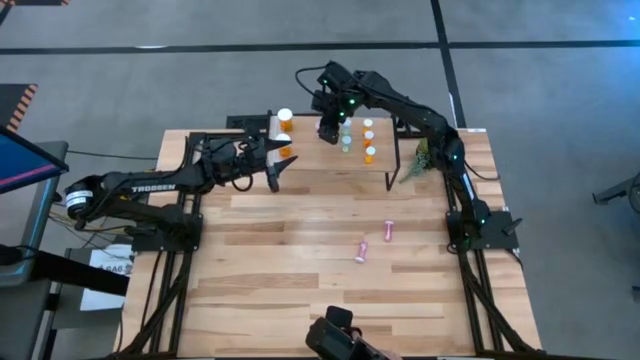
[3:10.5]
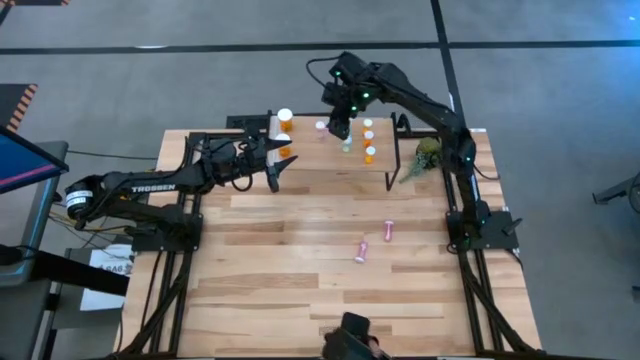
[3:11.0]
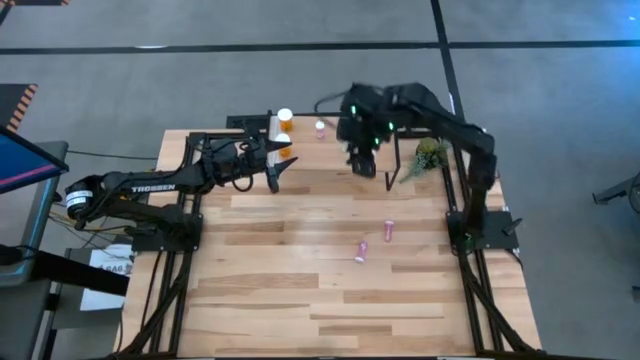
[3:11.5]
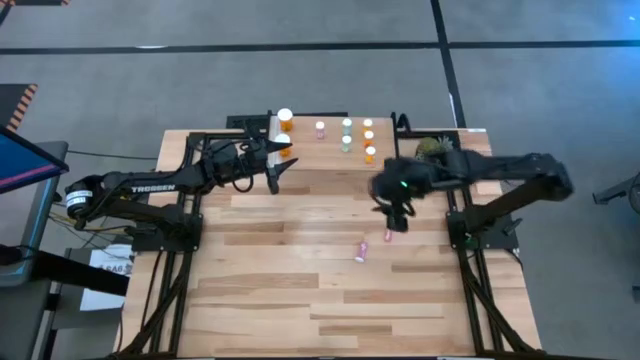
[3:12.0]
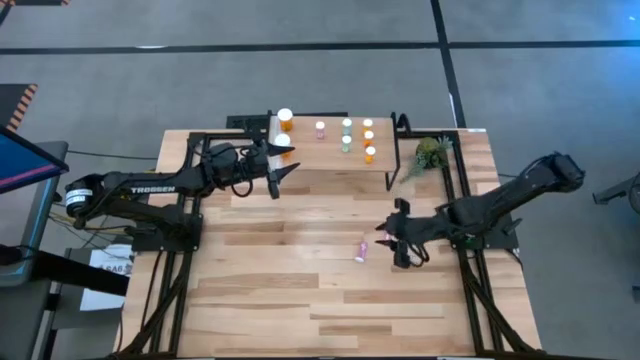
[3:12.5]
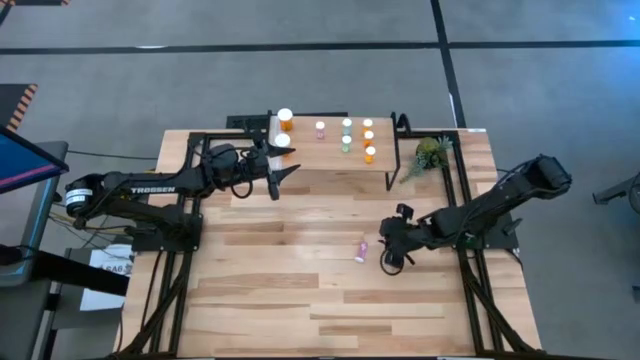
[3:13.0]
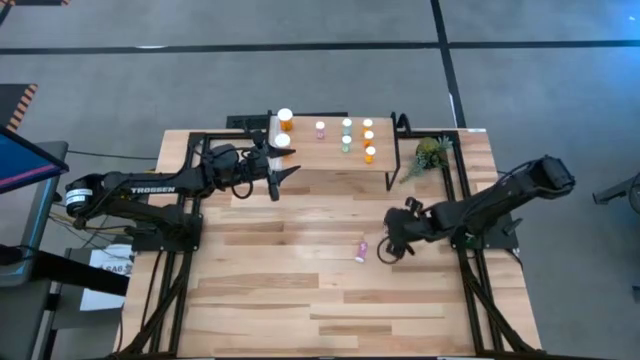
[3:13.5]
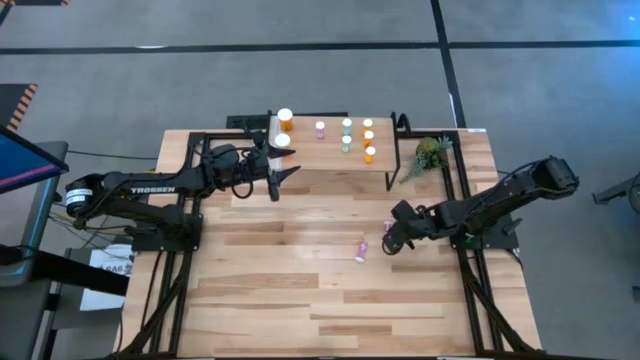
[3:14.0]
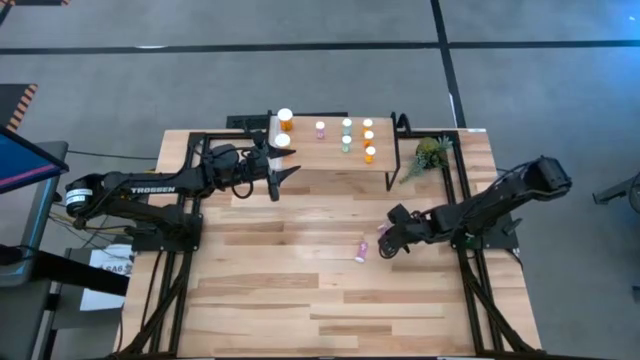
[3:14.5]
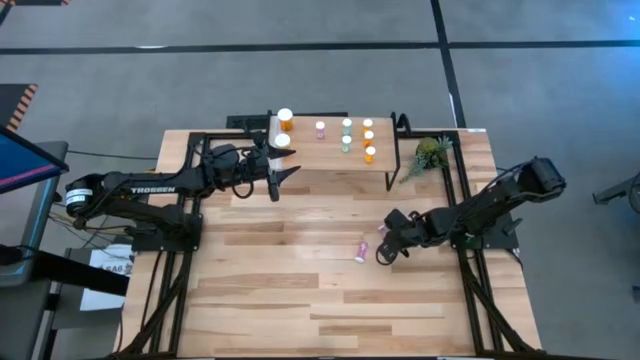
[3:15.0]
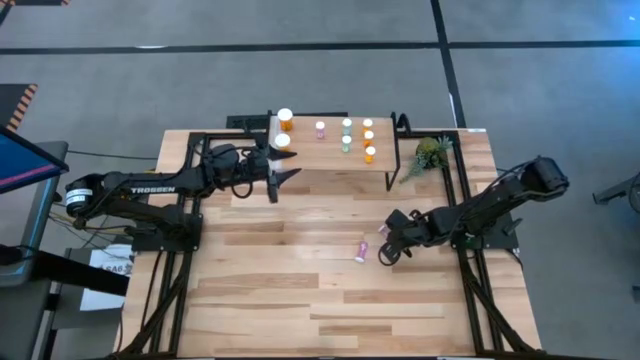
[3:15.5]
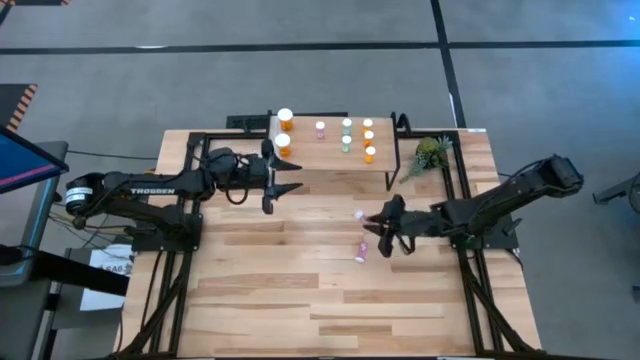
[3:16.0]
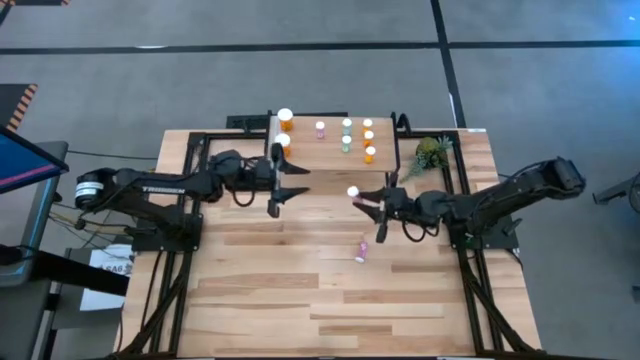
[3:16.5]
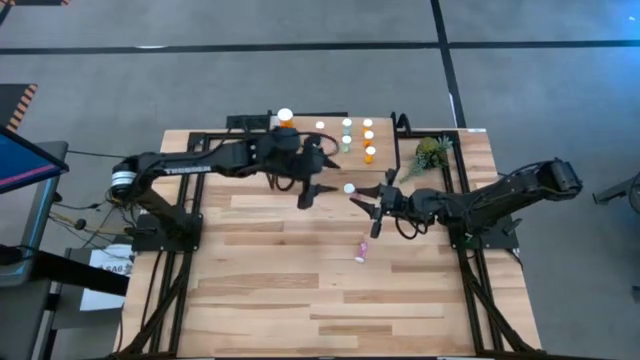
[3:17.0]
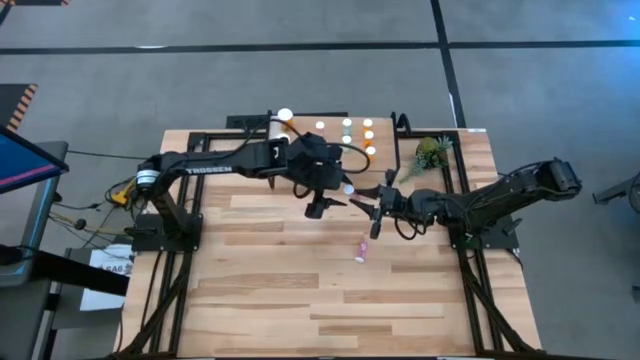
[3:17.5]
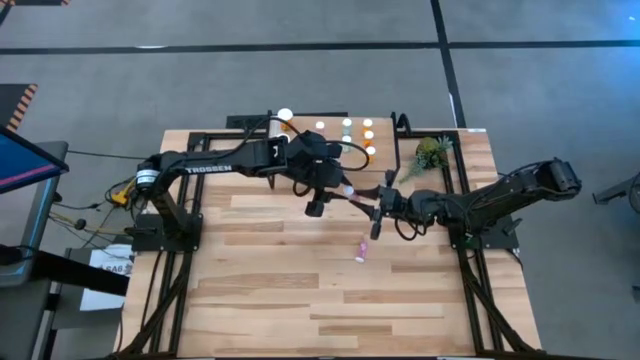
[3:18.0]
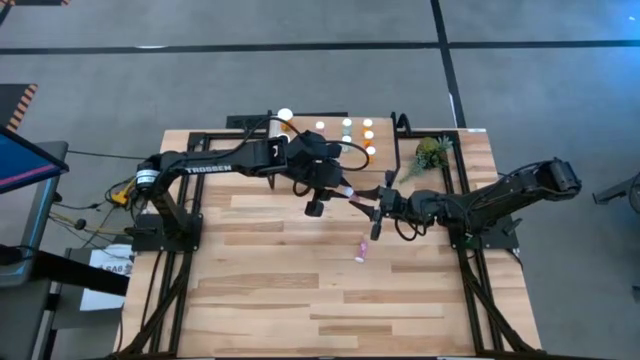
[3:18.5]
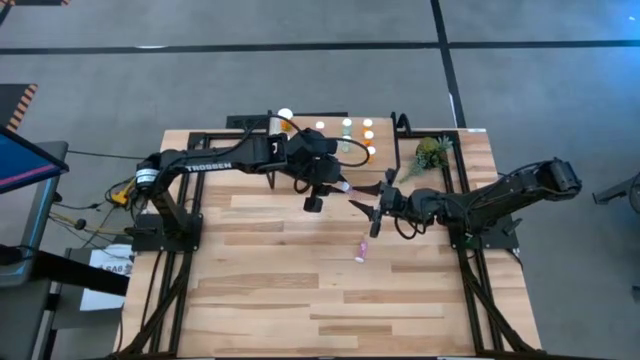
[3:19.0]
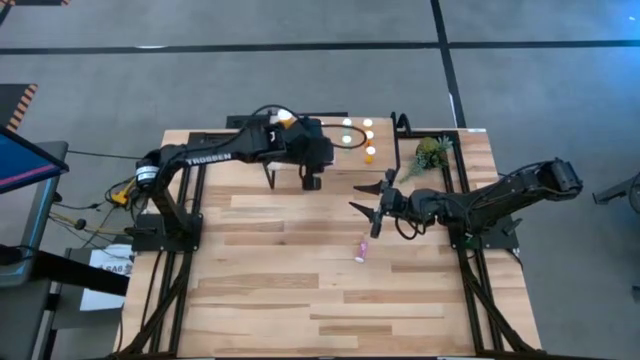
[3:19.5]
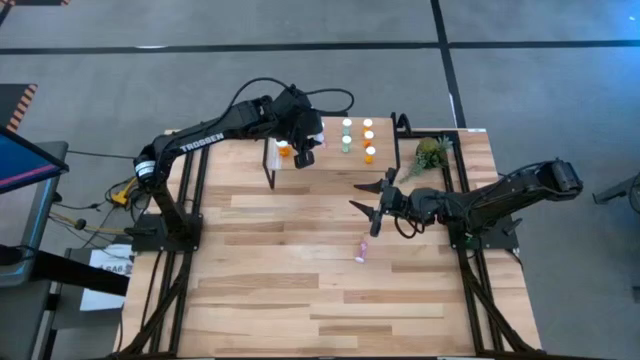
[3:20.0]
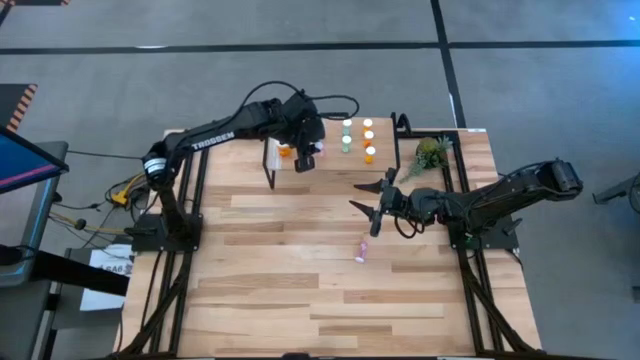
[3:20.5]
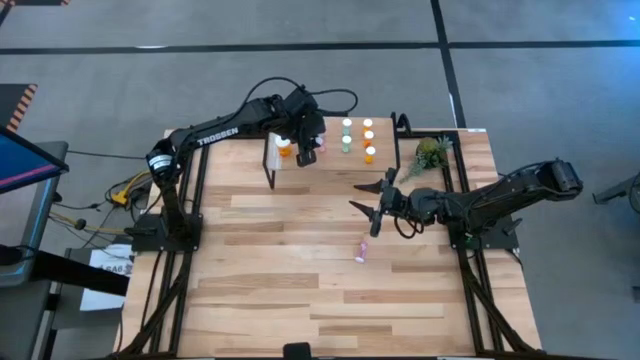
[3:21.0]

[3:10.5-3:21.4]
Task: Pick and place medicine bottles onto shelf by color
Put the top pink pill bottle on the shelf aligned with the pink pill bottle

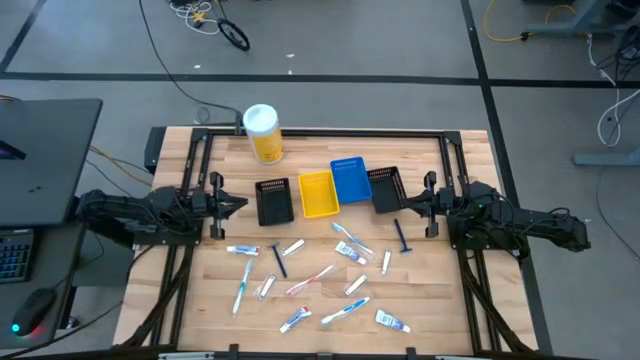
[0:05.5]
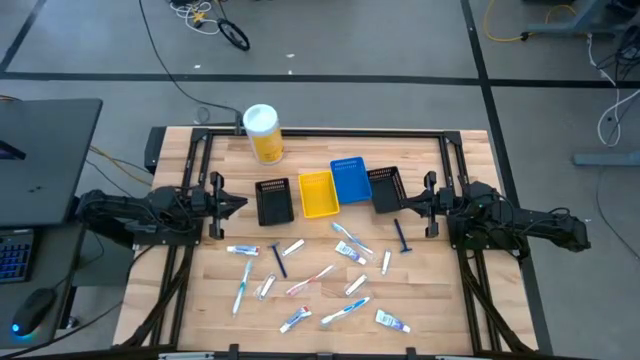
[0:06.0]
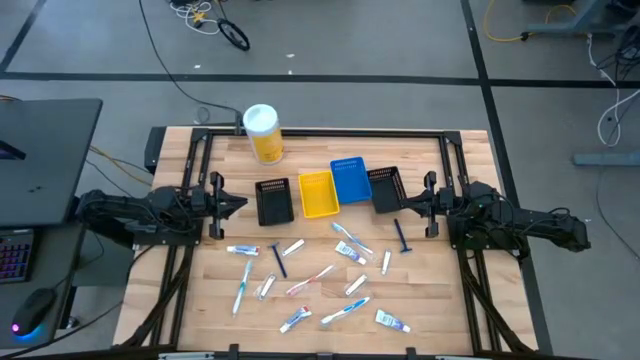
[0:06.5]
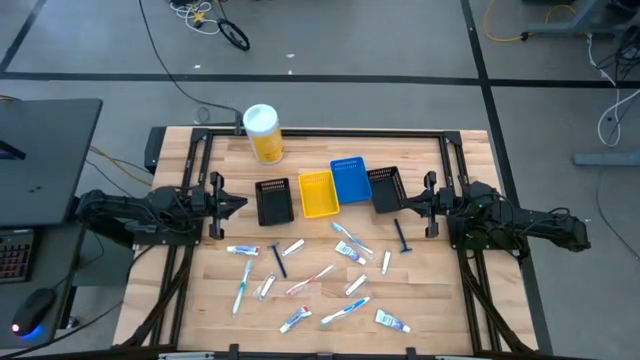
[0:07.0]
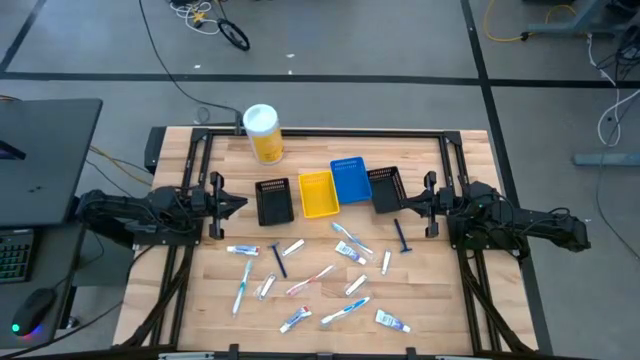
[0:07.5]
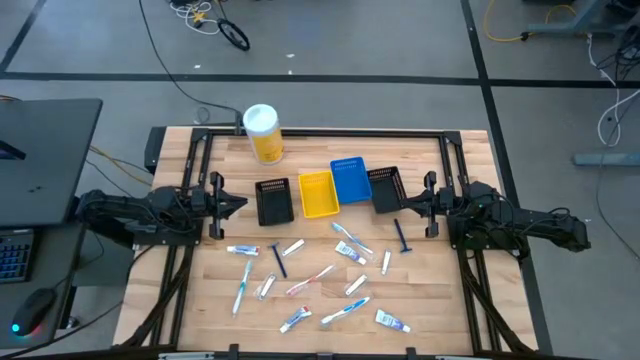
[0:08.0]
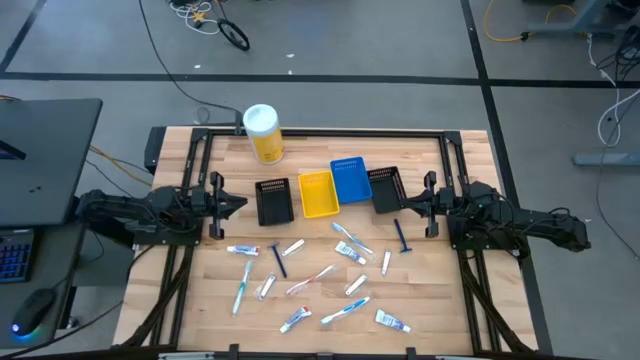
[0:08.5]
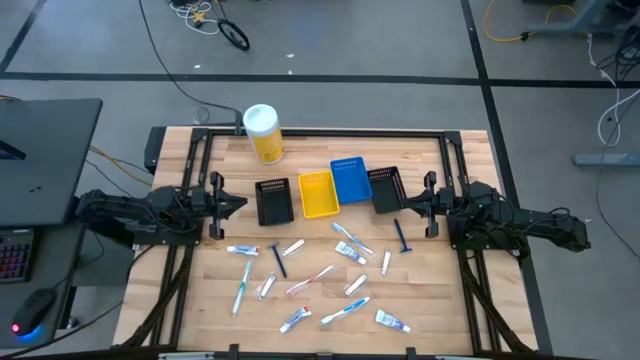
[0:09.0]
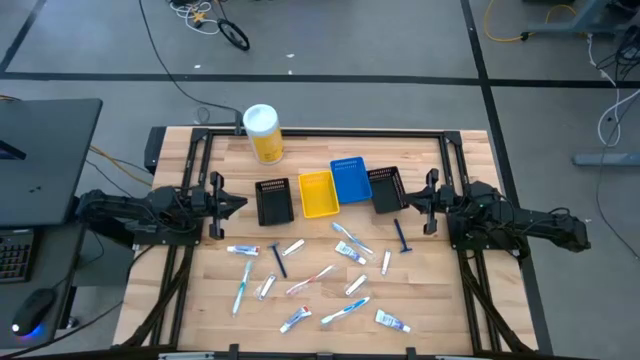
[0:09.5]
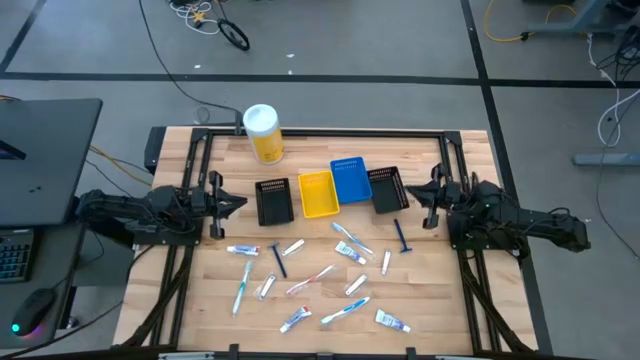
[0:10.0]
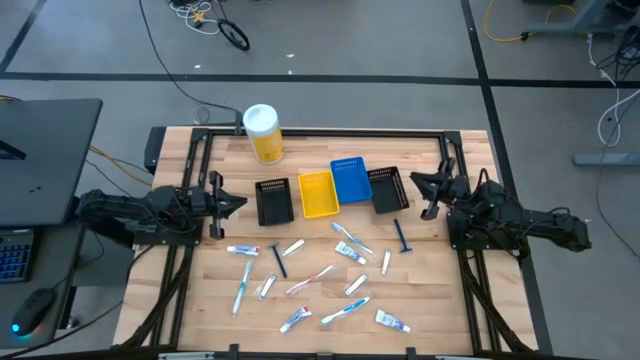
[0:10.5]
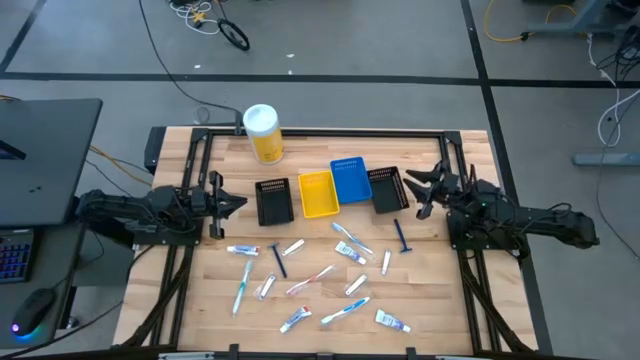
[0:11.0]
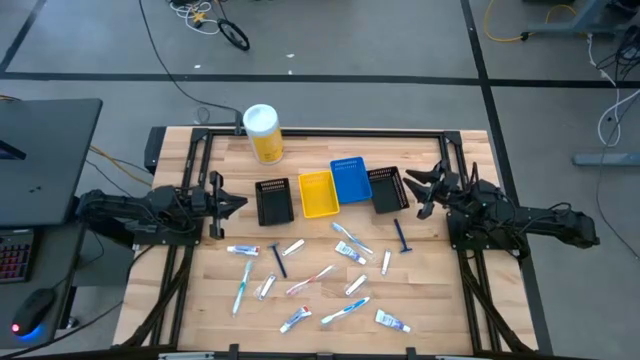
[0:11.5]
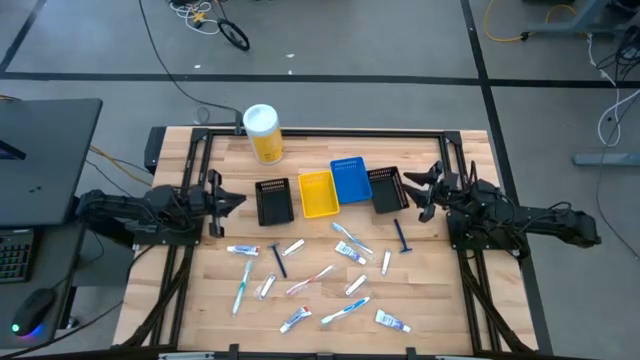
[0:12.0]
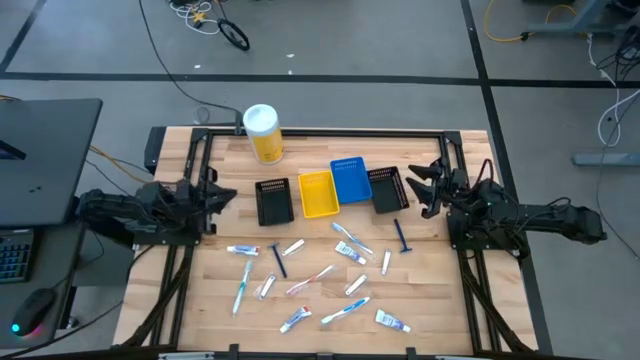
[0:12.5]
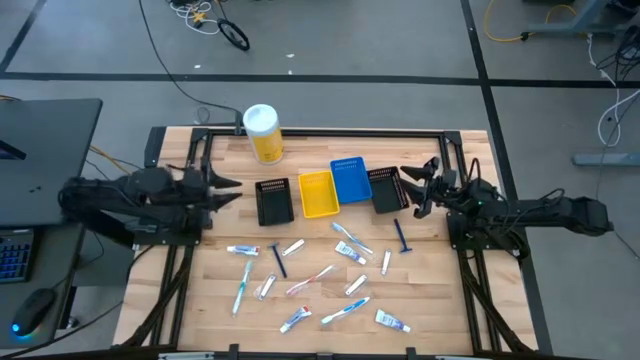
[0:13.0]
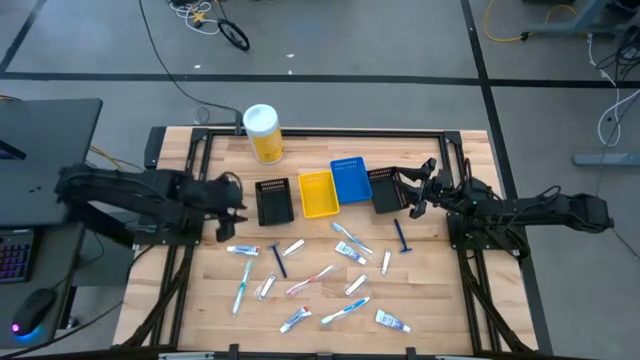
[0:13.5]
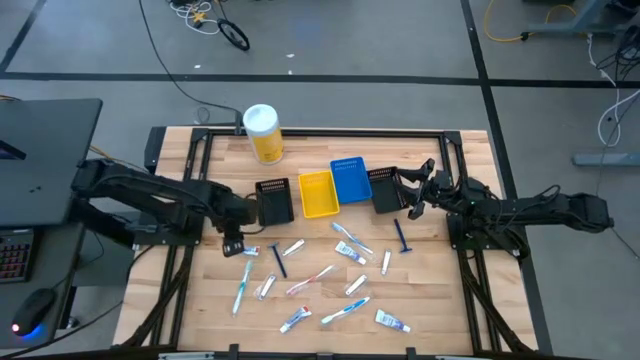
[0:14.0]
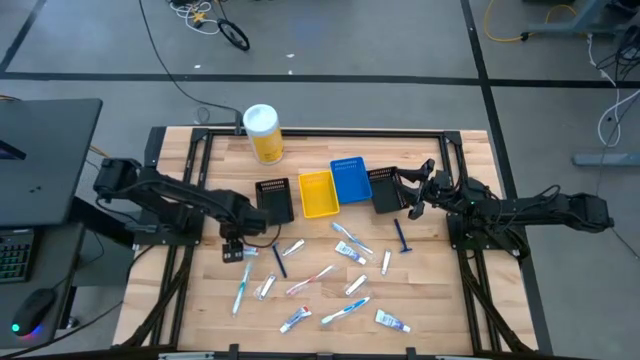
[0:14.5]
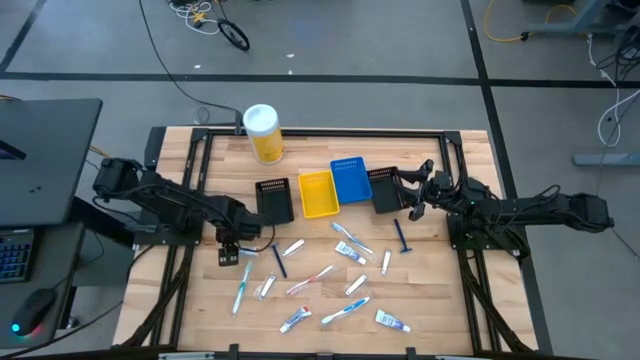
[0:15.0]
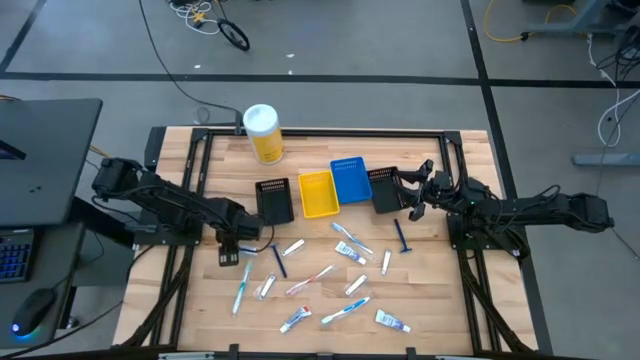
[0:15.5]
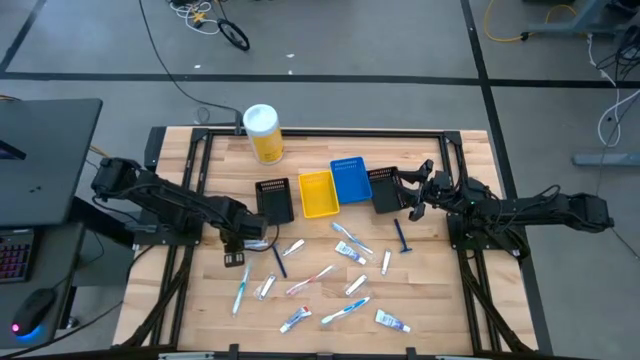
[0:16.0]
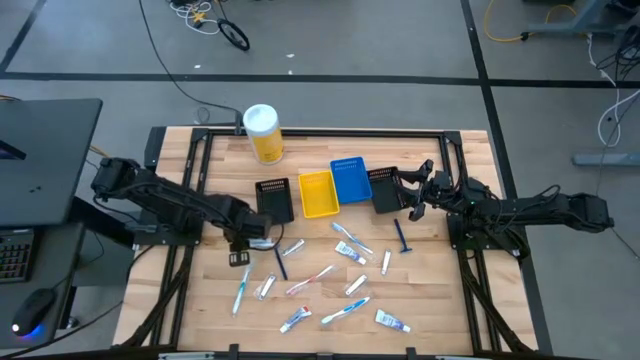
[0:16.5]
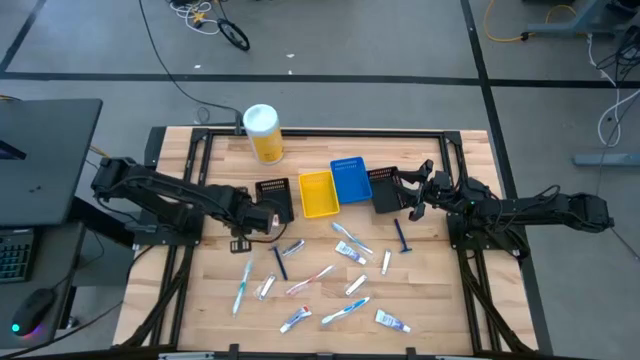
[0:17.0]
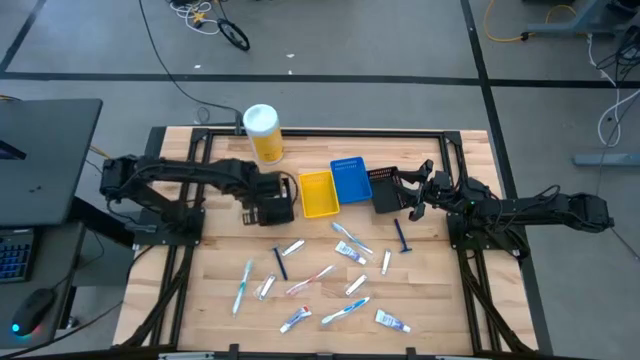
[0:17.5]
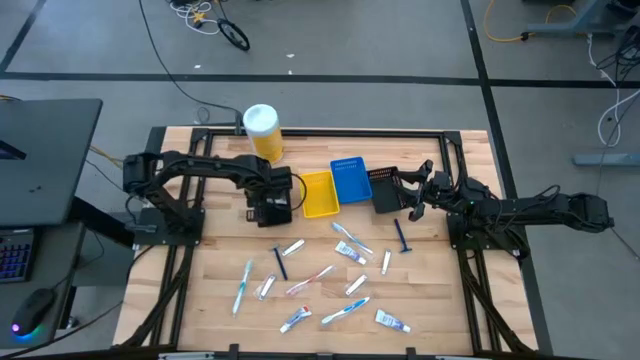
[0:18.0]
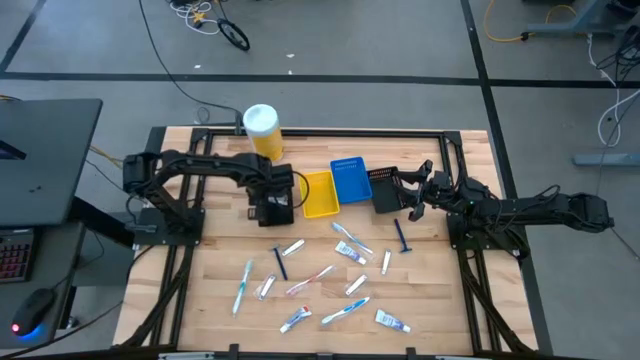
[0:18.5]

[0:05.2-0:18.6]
Task: Pick & Place Travel size toiletries
Put the white toothpaste into the left black basket
